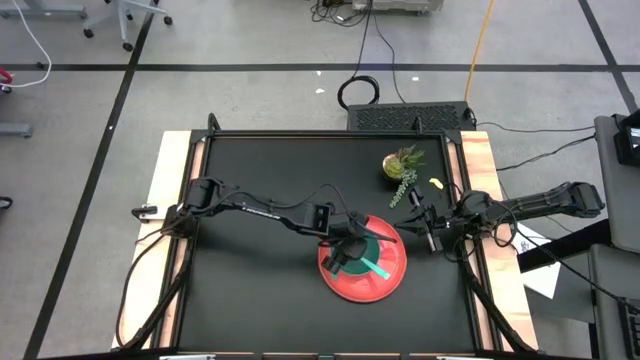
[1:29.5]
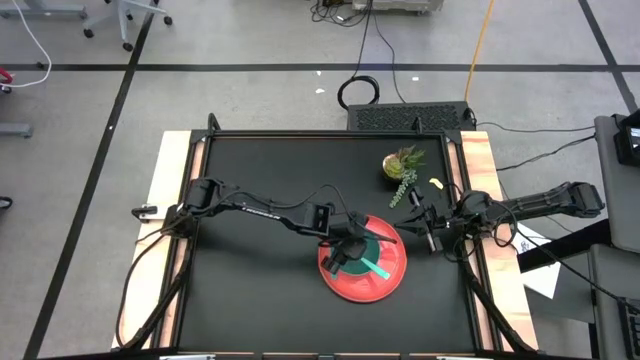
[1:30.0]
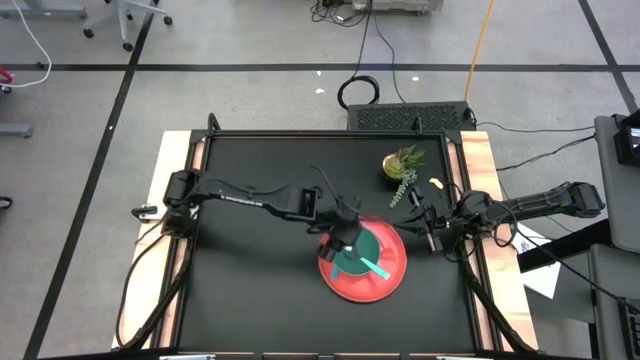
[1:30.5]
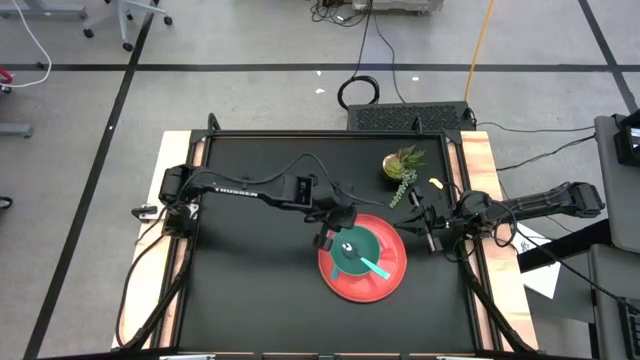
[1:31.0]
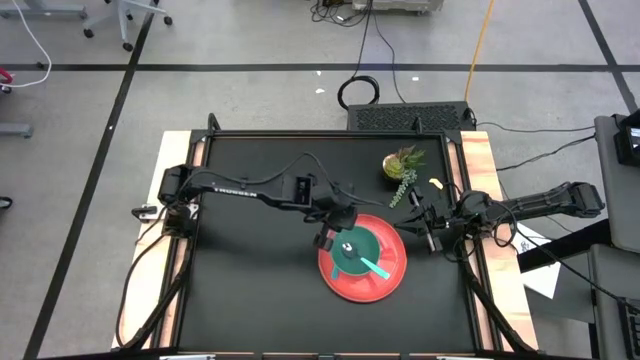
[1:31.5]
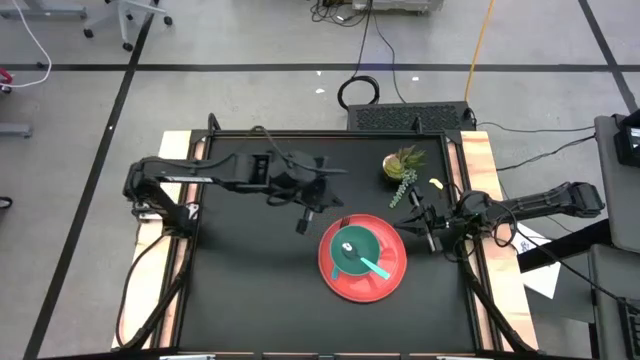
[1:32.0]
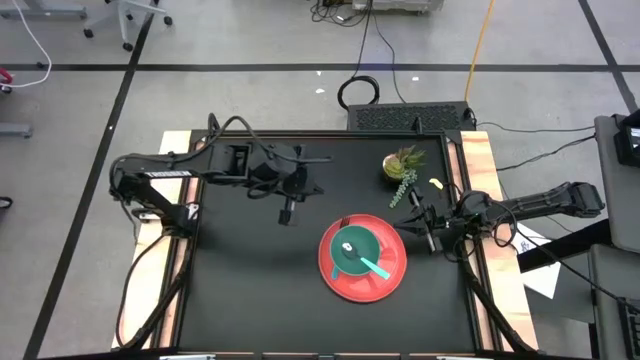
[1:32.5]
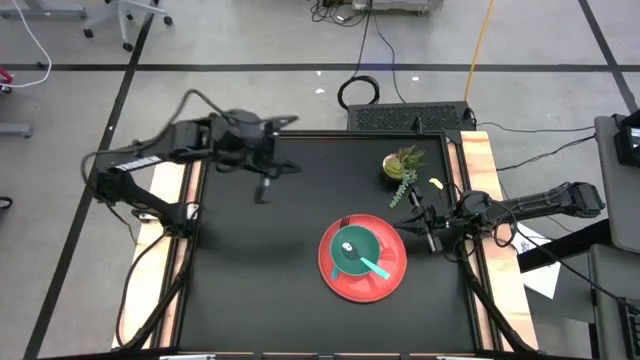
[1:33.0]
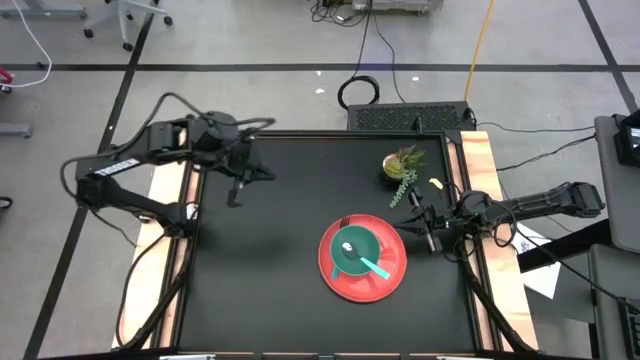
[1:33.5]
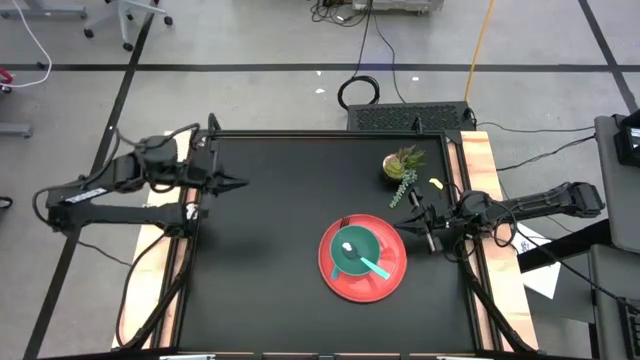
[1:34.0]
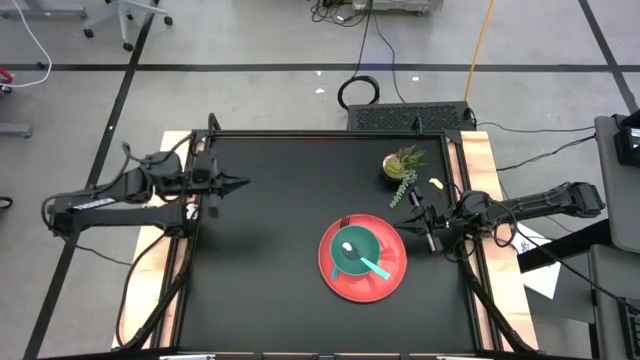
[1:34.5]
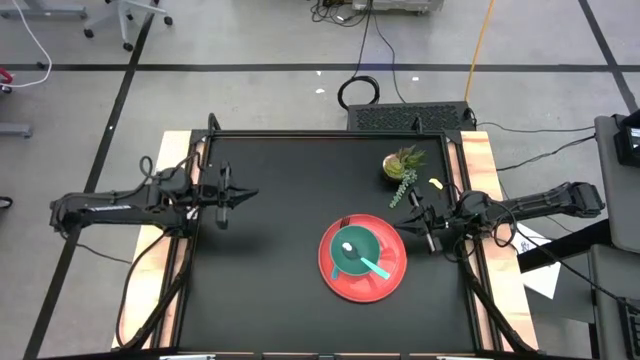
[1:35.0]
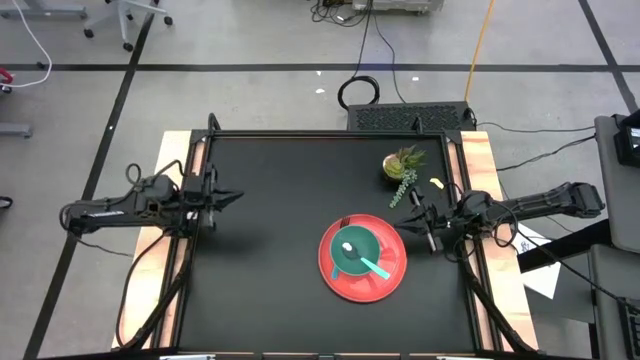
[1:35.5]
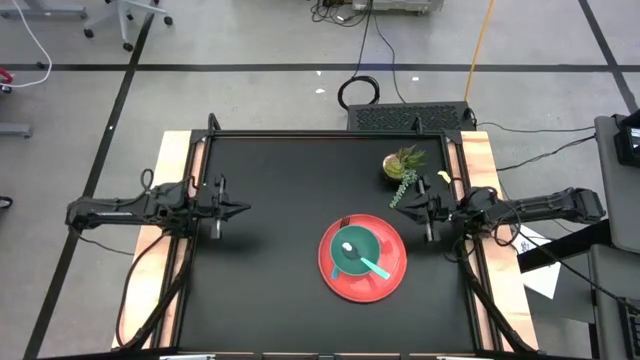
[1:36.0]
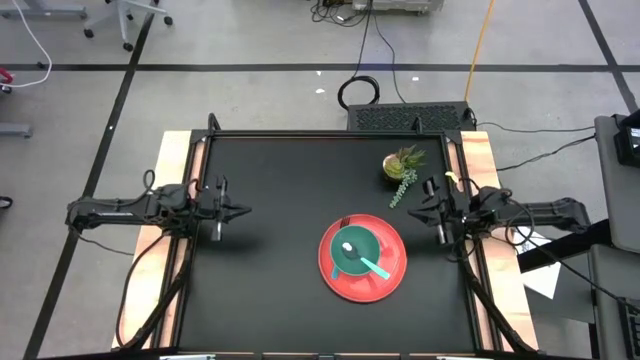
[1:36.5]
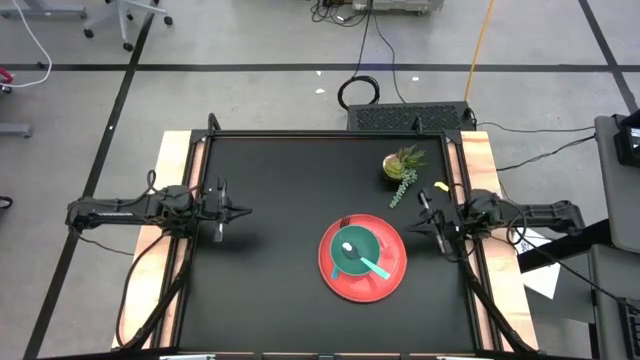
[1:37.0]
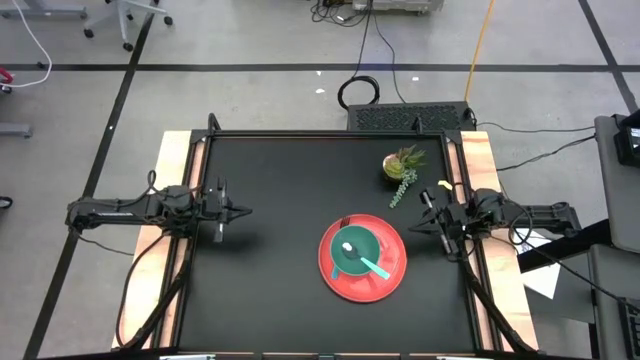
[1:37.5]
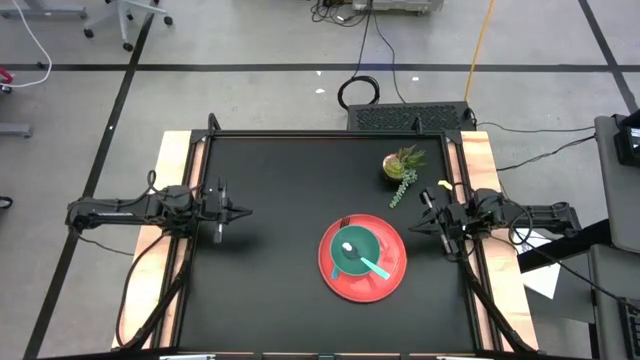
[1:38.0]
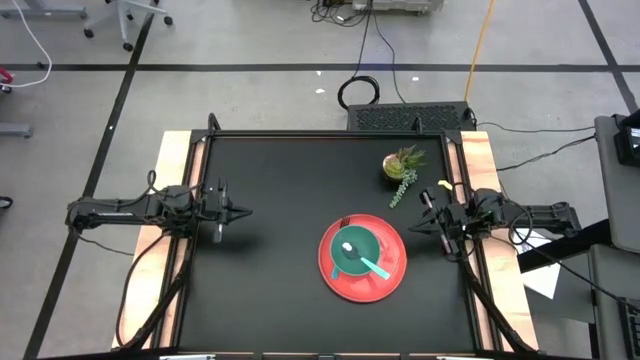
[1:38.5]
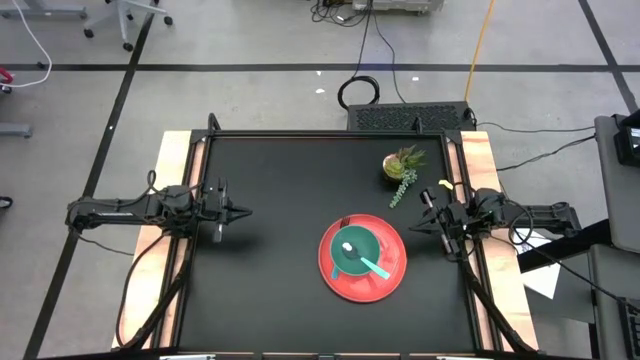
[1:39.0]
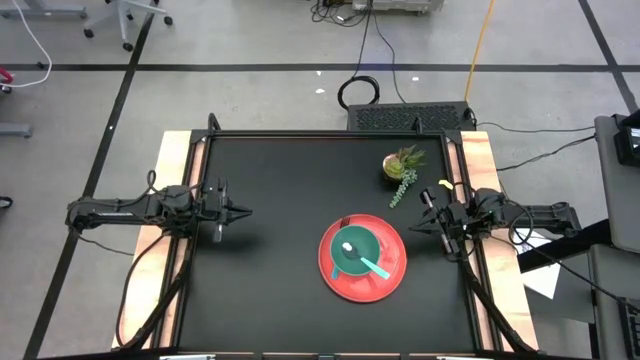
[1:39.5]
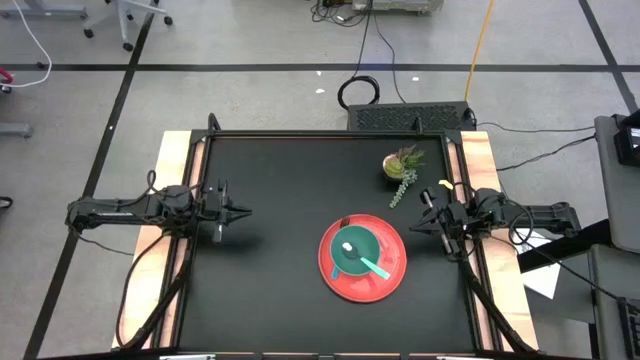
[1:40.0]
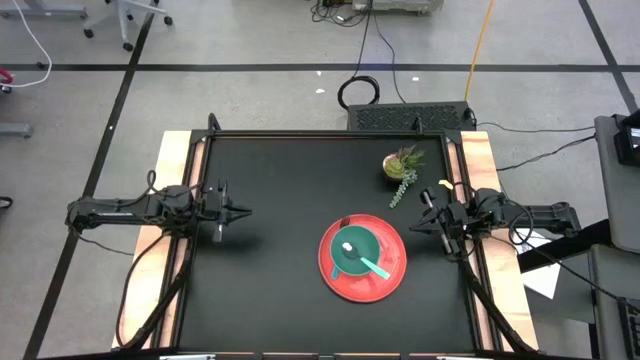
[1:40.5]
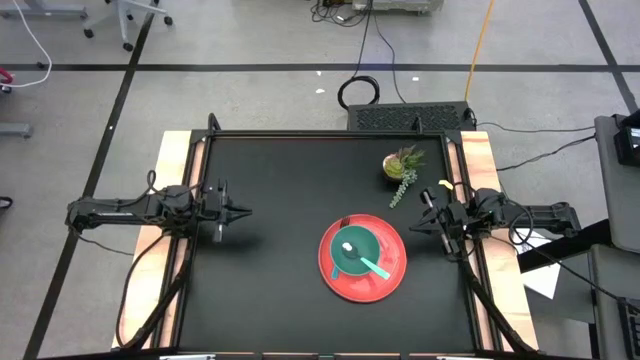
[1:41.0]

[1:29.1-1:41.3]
Task: Set table place
Return to Home Position

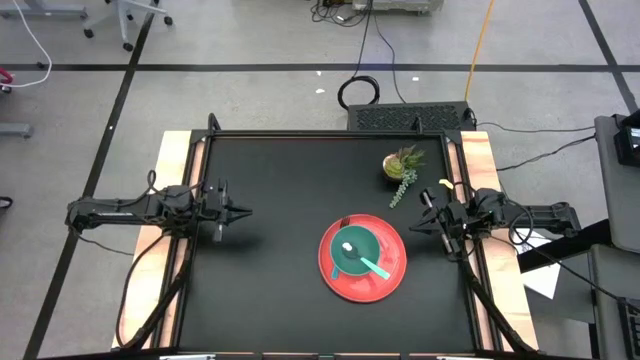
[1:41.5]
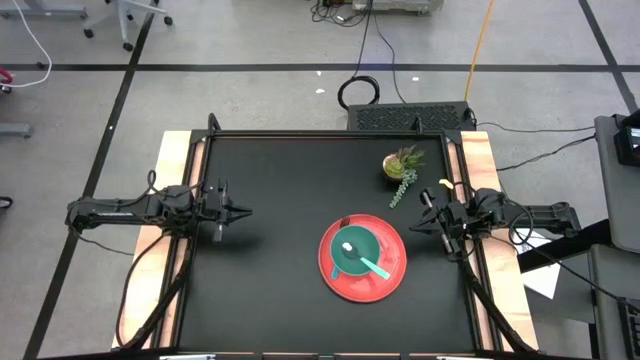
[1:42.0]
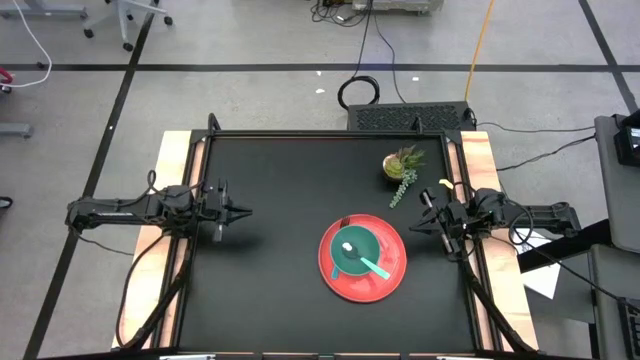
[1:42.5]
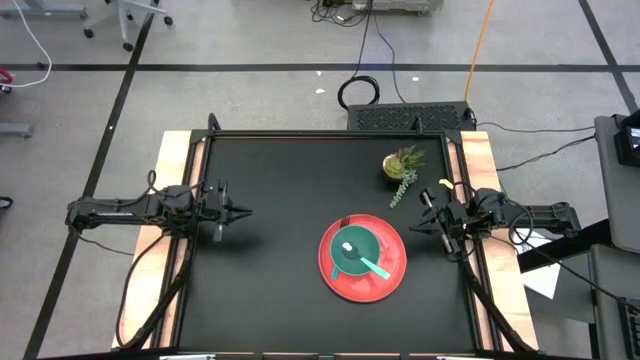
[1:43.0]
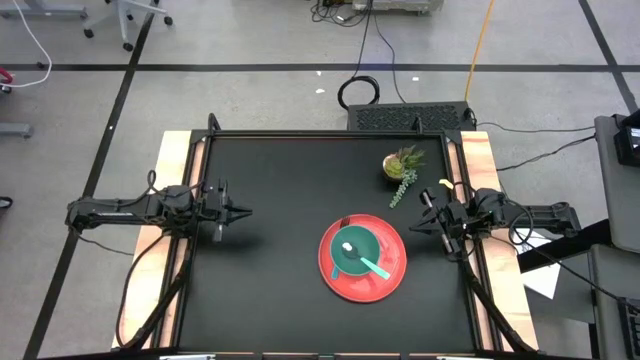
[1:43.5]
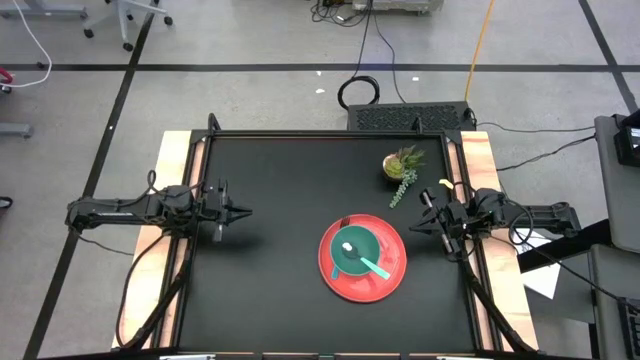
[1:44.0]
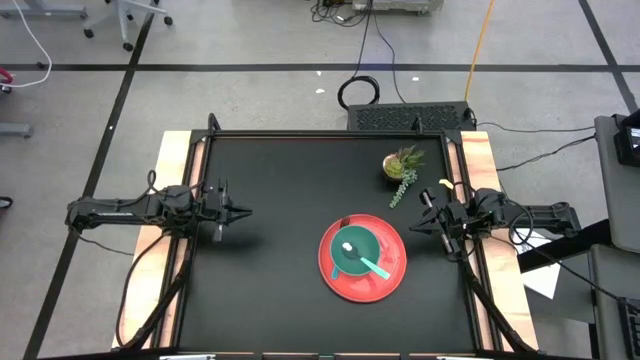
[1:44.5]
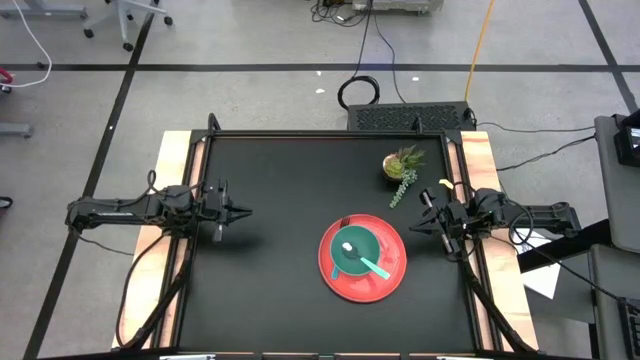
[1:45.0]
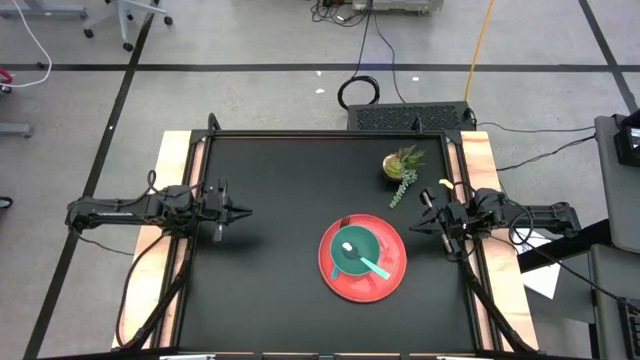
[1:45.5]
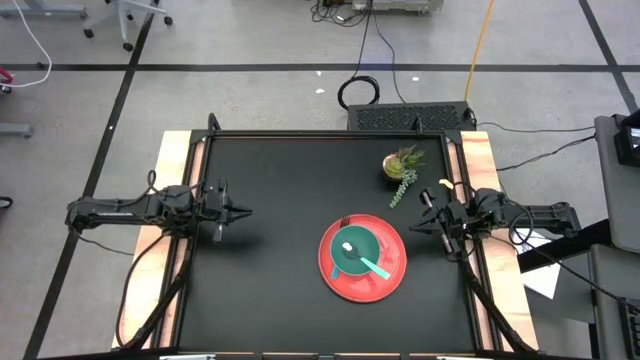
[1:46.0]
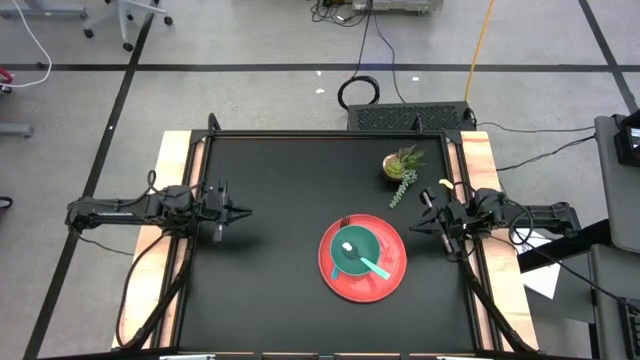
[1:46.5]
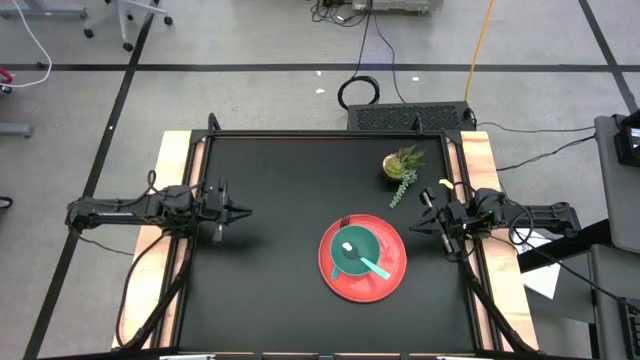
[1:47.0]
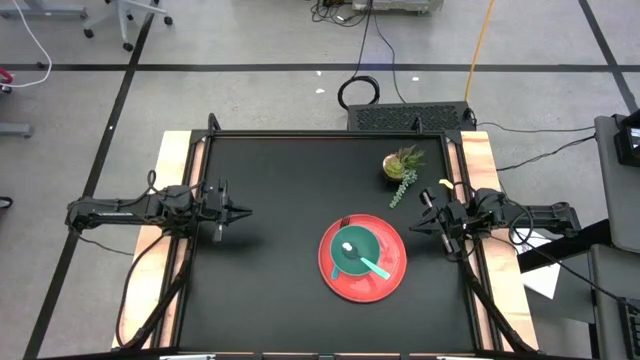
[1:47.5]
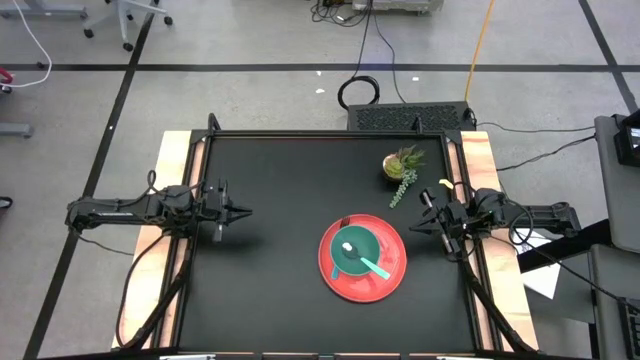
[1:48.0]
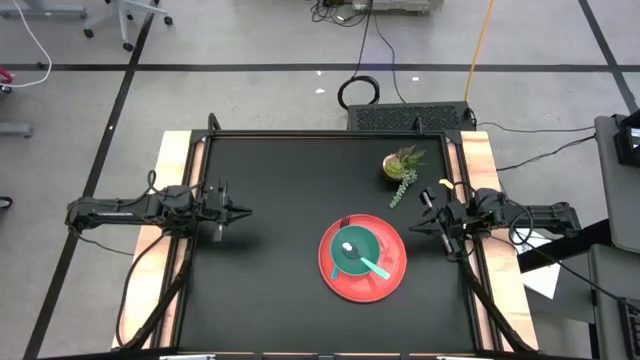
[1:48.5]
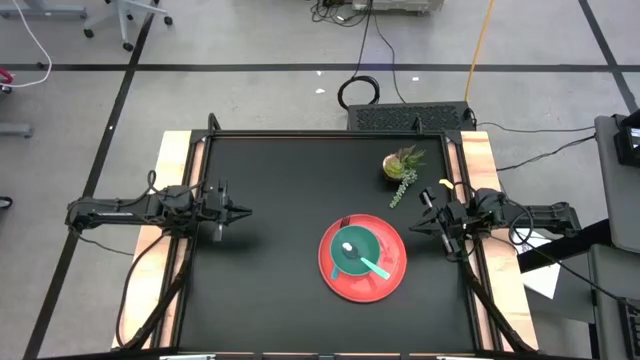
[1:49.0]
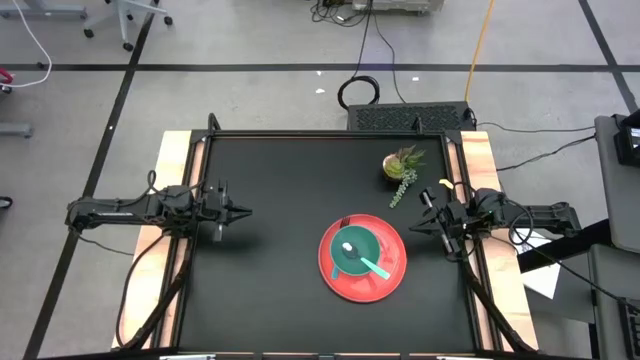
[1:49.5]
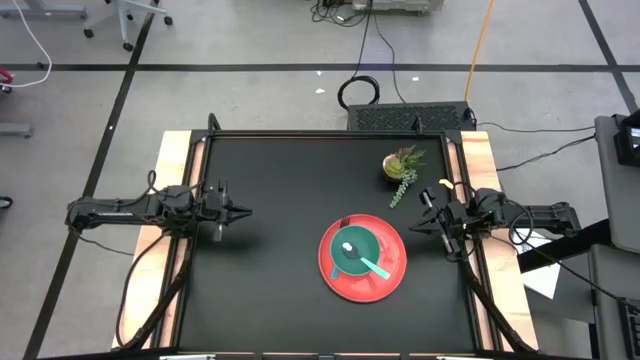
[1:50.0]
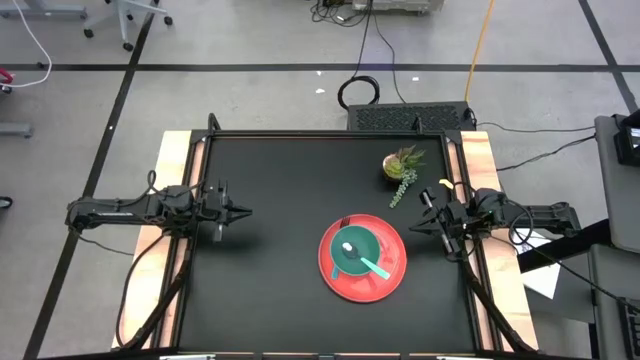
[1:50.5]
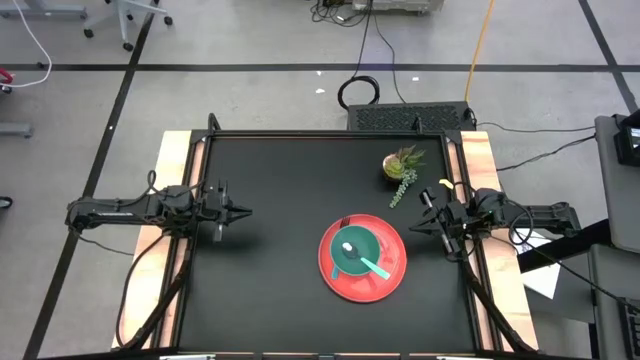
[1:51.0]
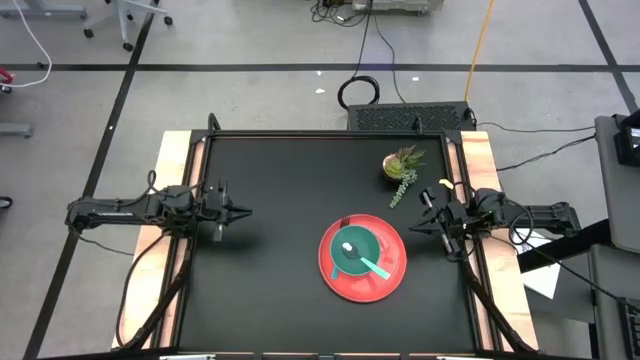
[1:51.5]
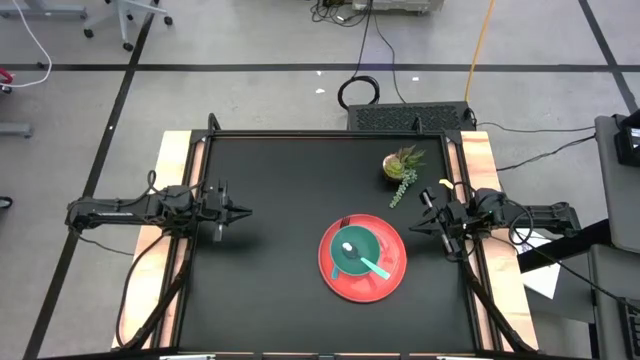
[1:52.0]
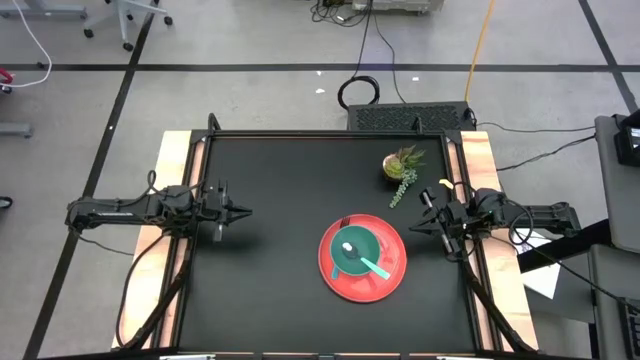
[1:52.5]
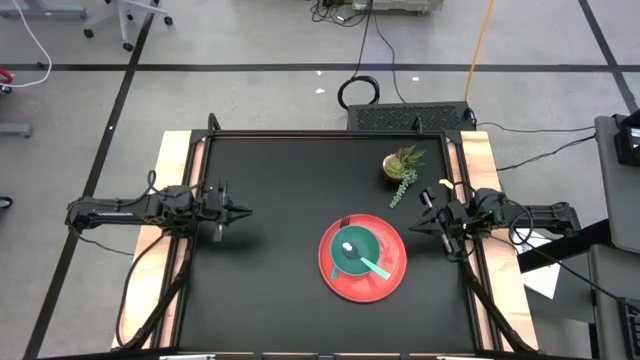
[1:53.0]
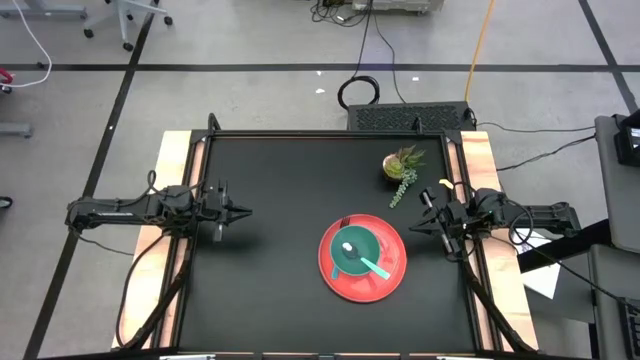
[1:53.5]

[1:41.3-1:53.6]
Return to Home Position
